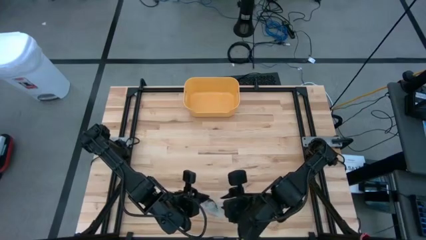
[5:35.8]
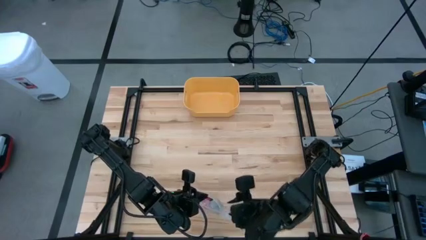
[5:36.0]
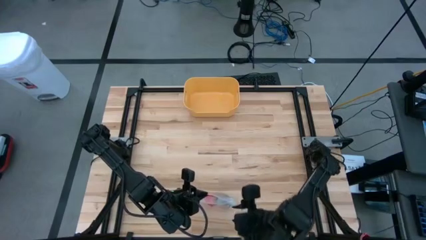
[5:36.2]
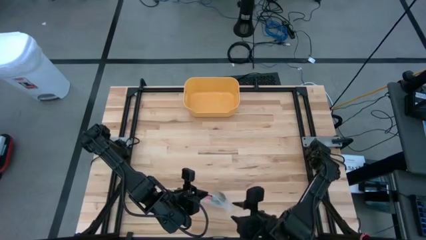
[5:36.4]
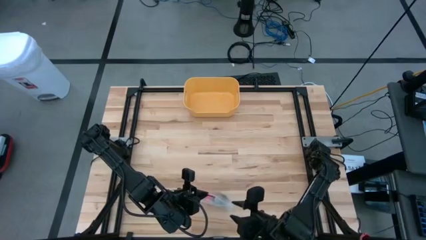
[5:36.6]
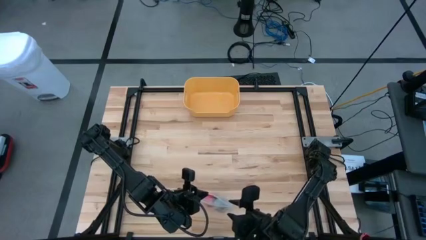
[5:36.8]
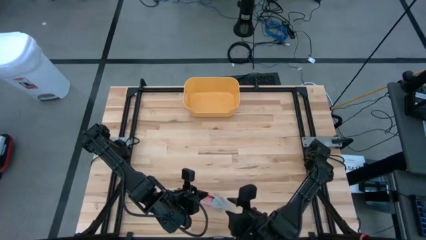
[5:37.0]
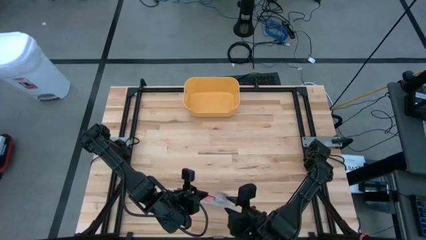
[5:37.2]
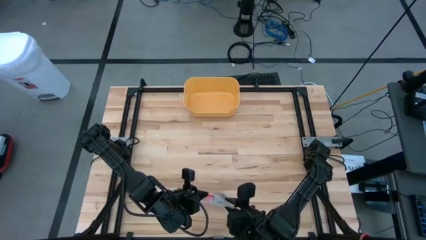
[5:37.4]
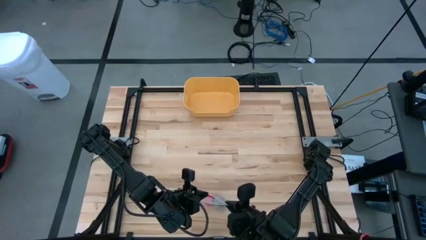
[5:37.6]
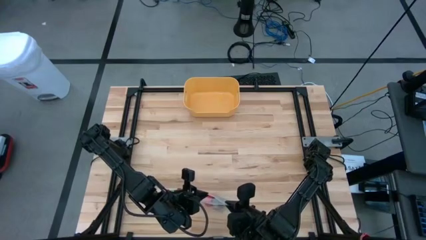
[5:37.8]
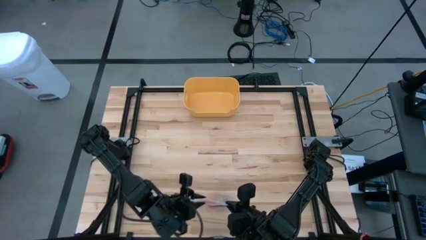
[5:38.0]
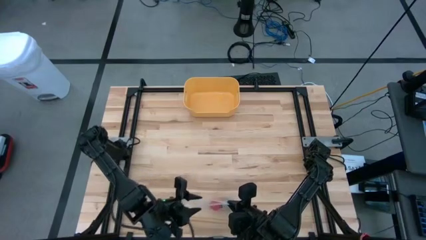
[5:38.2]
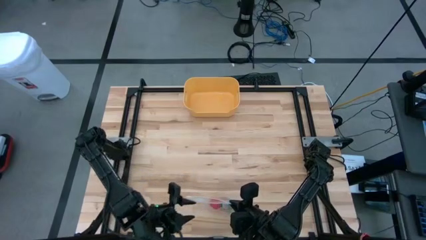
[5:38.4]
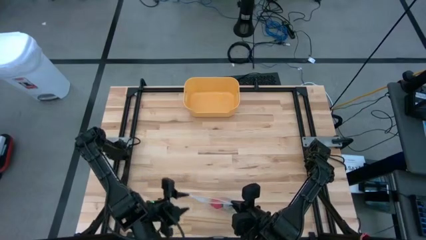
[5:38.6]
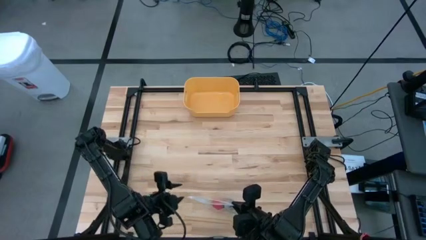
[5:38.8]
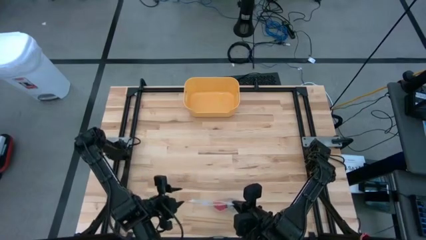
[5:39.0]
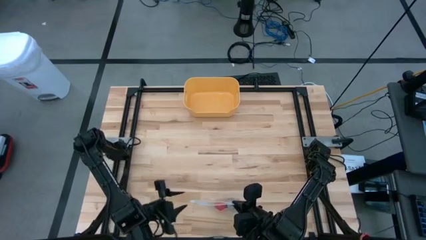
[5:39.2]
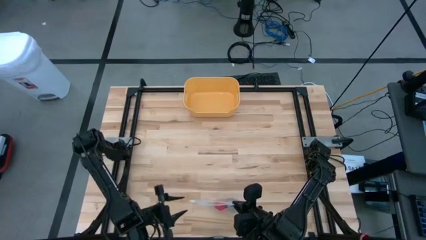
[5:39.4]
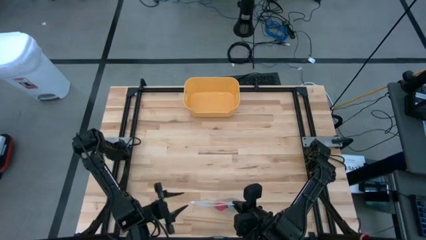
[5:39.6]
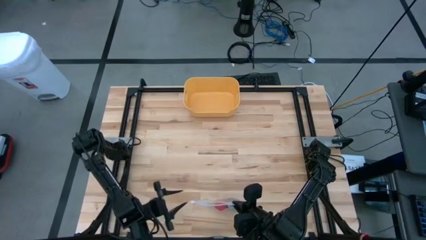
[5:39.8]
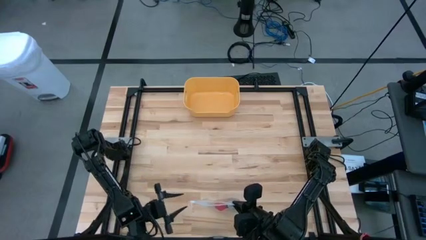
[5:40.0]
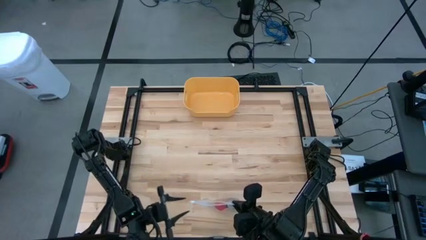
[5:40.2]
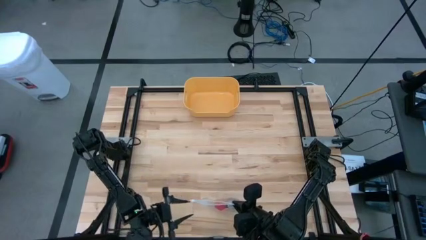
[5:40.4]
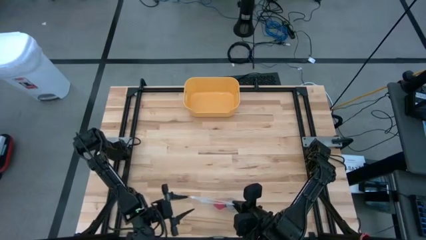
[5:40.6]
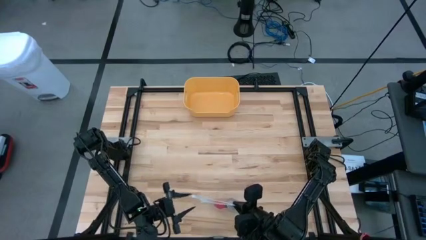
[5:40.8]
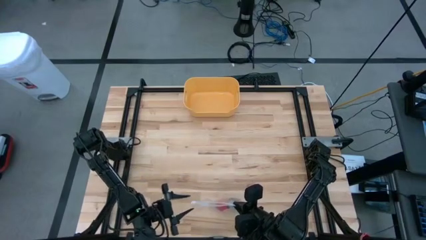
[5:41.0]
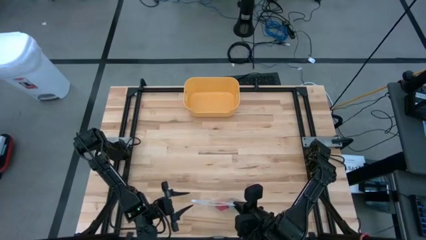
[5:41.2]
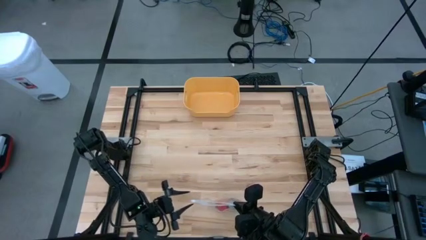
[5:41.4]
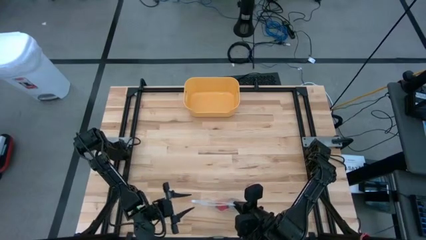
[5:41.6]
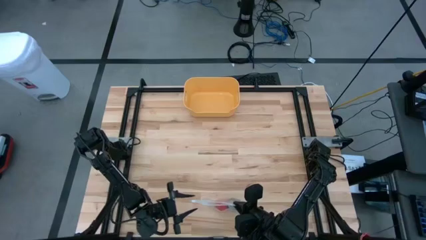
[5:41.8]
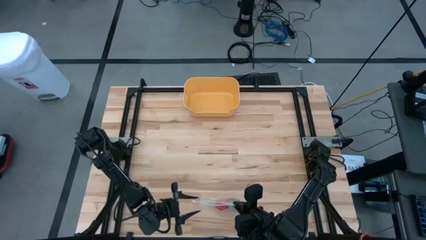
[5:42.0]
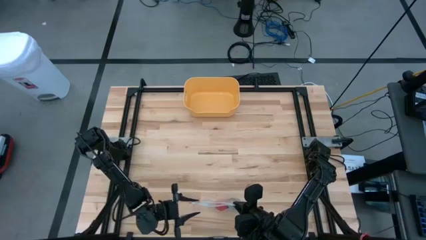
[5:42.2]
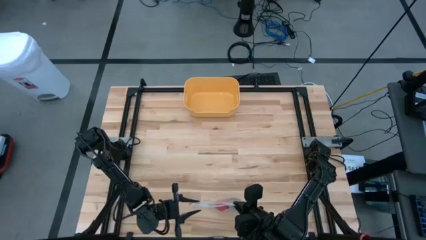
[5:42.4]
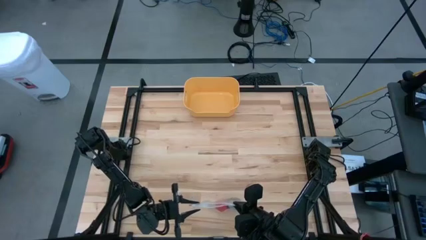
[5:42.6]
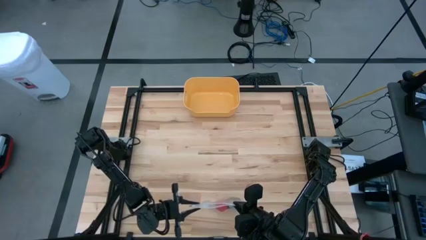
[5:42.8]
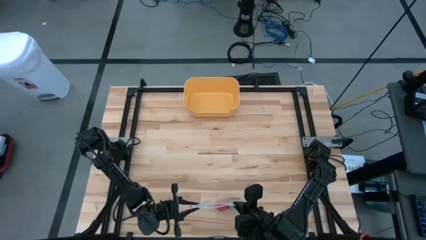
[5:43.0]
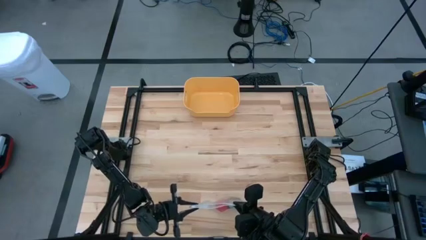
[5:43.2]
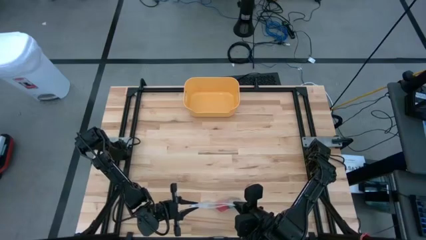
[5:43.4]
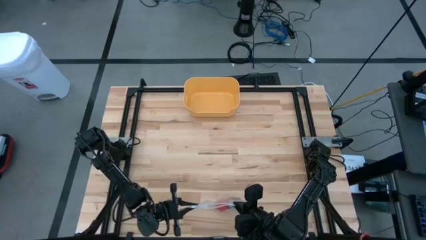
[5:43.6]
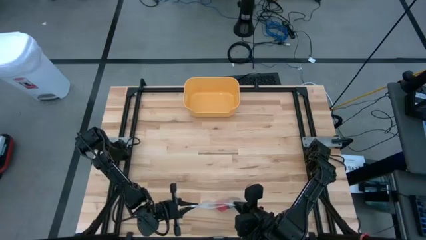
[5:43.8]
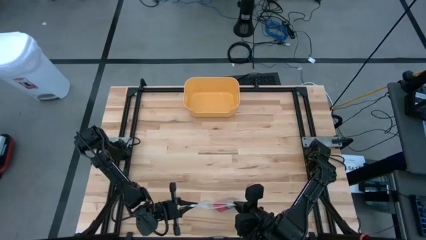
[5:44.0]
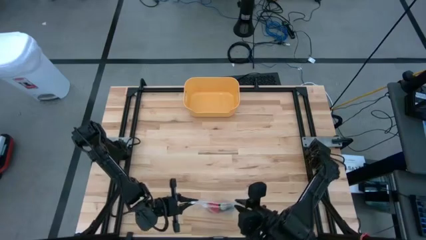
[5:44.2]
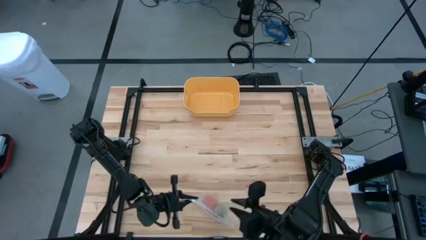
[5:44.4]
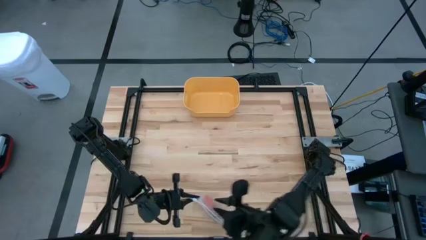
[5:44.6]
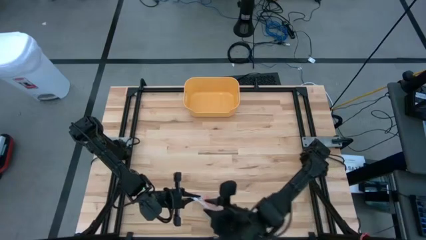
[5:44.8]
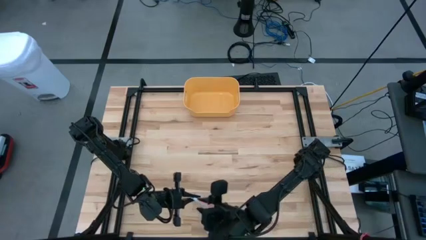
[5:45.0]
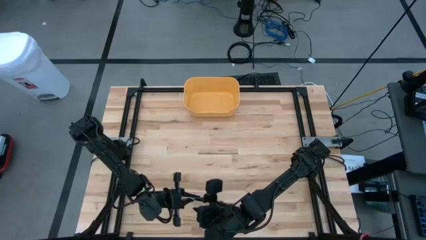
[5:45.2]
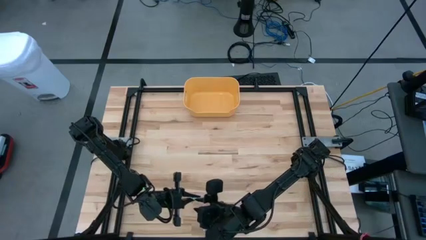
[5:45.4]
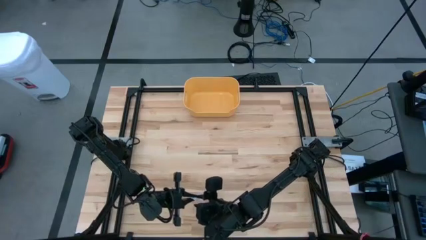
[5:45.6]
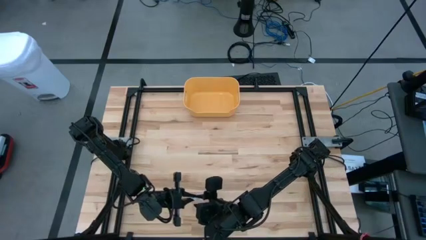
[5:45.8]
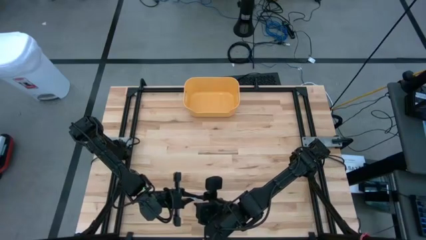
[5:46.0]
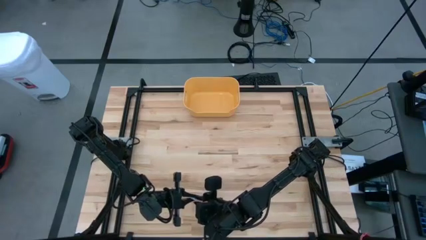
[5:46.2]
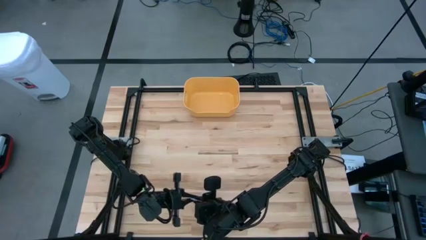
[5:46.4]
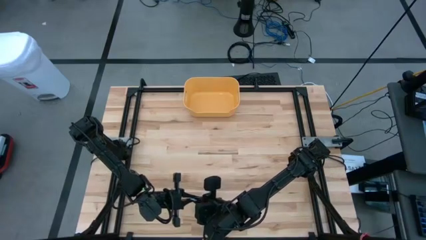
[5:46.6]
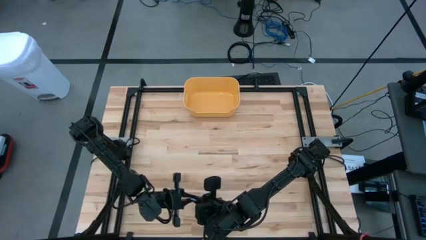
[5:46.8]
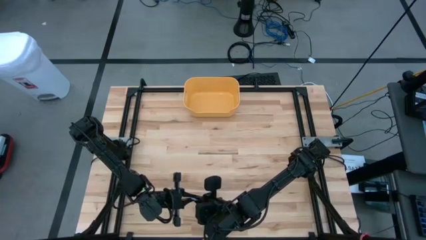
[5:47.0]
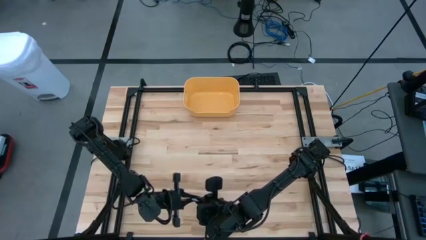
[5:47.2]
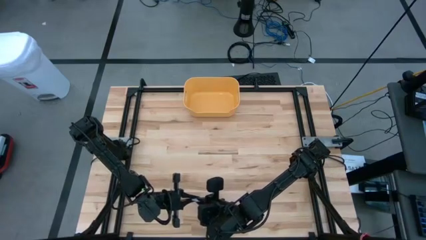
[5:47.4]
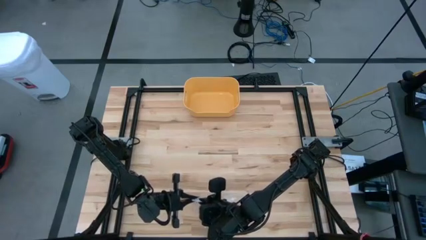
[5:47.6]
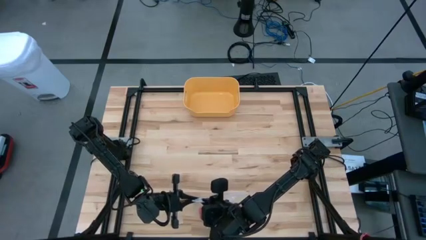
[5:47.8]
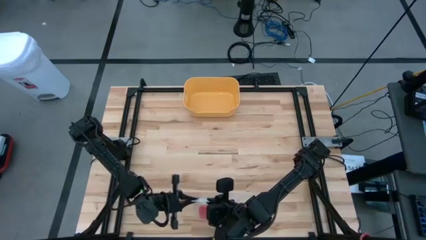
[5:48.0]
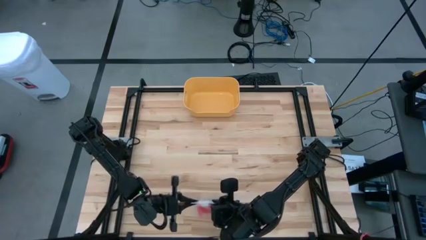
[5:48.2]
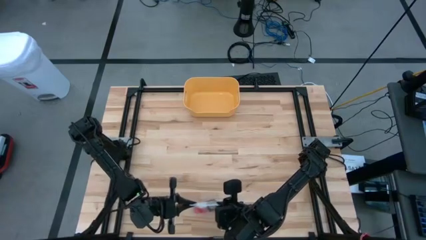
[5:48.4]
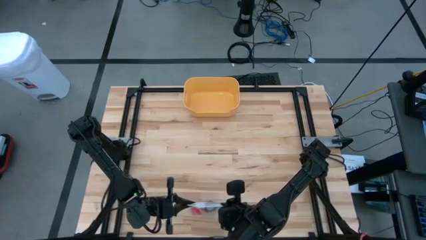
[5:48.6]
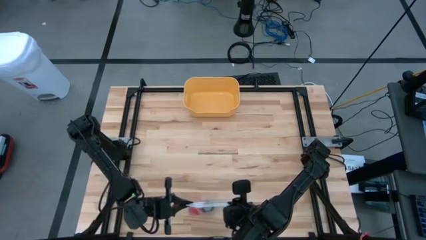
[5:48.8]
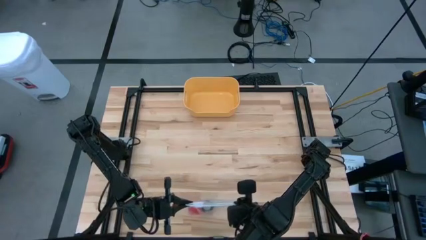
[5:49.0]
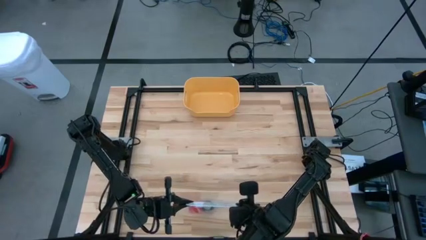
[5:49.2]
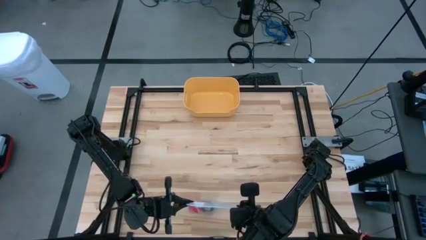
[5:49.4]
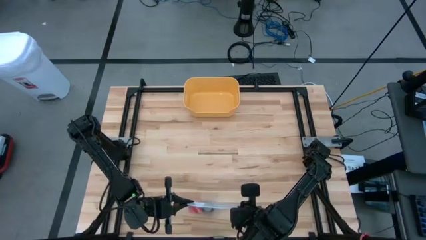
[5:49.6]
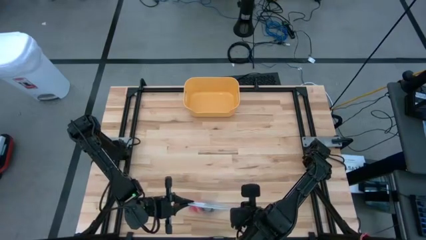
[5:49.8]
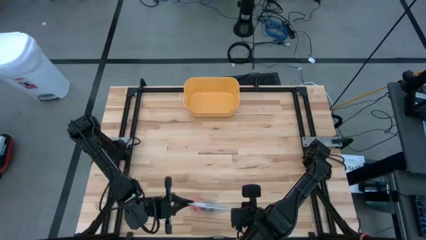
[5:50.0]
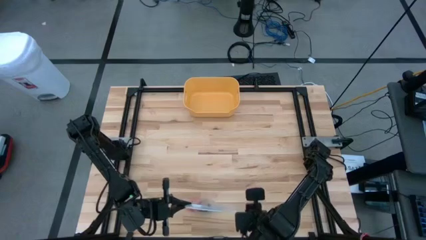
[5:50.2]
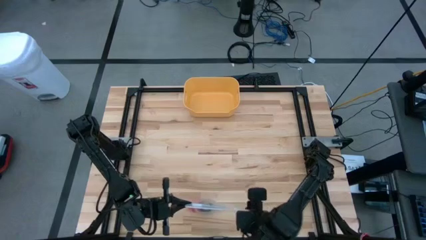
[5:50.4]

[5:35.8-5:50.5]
Task: Roll bandage
Close the transparent zip bag

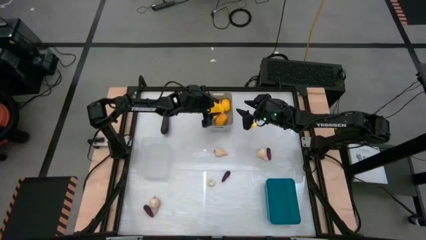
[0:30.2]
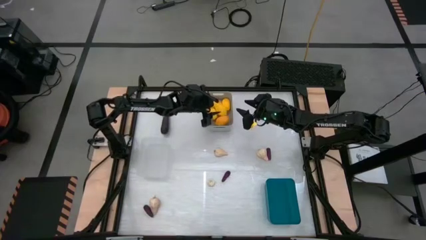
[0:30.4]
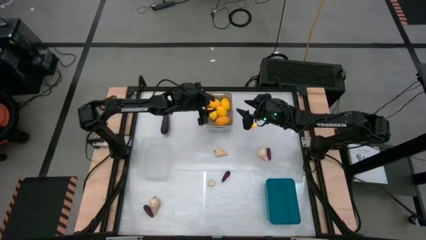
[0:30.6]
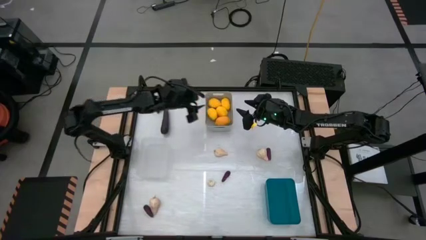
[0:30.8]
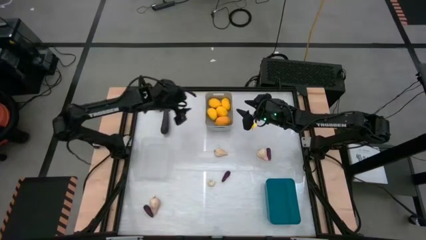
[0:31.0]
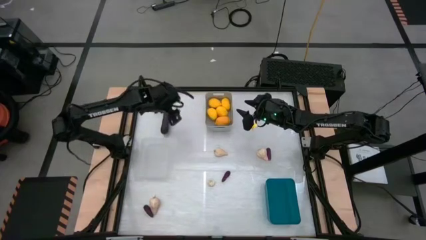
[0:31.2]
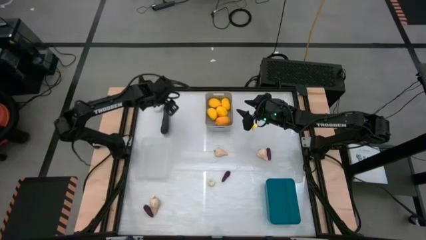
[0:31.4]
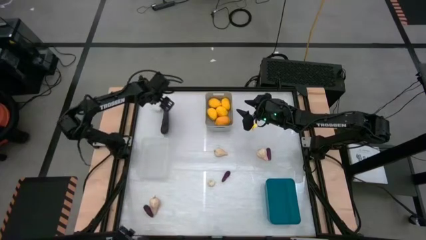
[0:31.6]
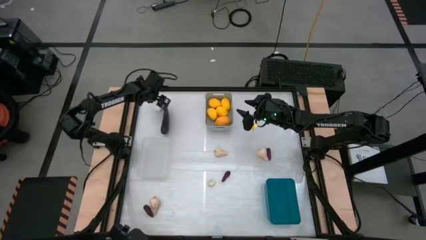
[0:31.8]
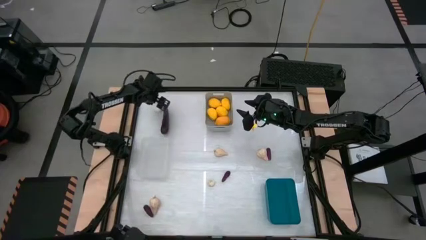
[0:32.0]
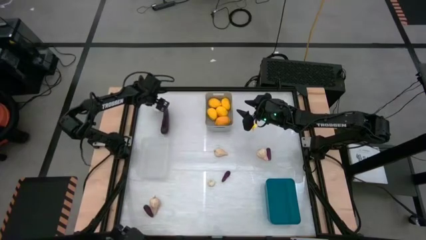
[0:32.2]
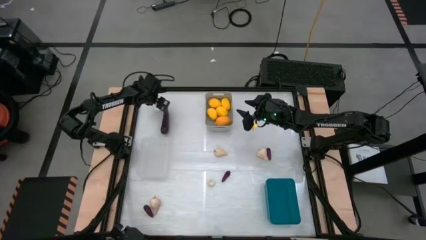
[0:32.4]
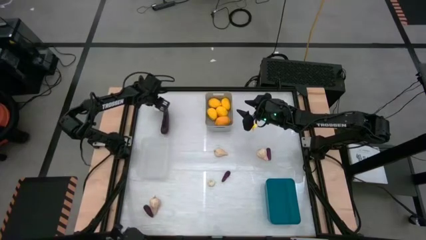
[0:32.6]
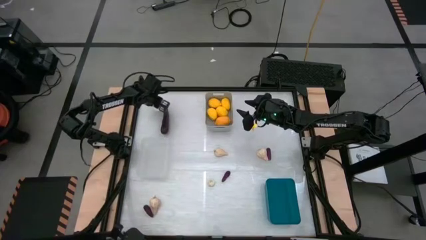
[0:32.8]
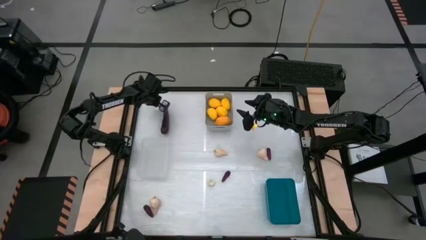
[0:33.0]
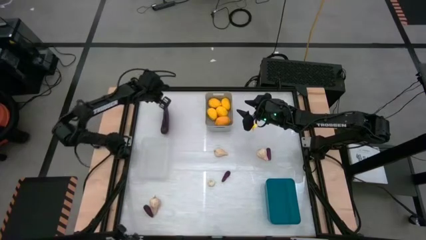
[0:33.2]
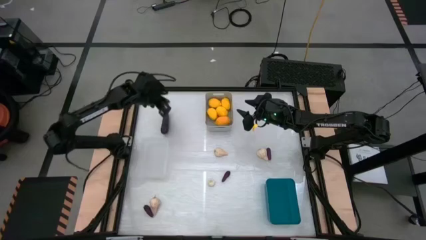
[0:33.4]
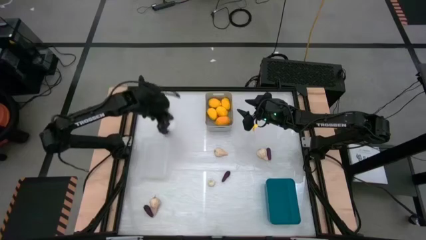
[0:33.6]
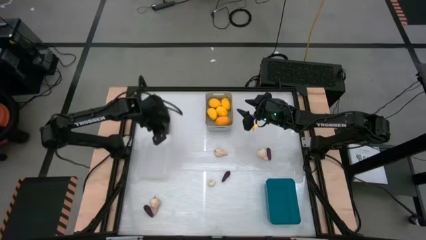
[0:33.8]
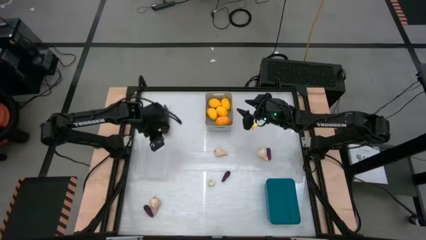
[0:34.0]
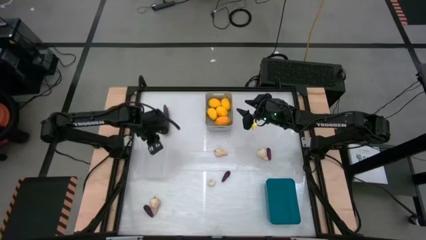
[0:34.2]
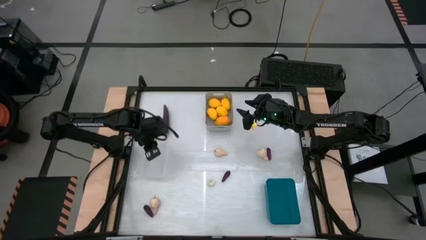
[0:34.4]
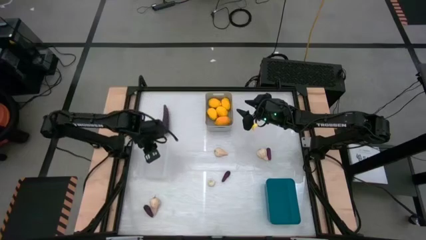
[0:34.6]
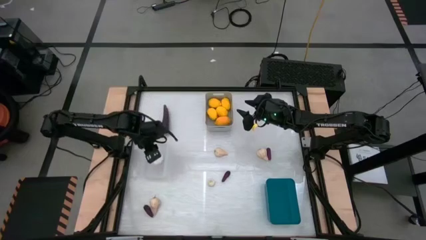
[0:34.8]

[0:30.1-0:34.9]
Task: Sort produce into baskets
Put the garlic into the transparent bin
